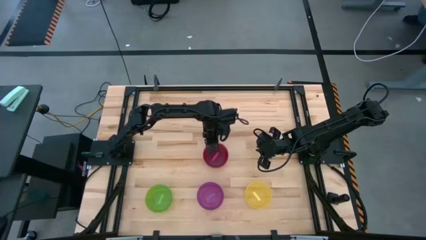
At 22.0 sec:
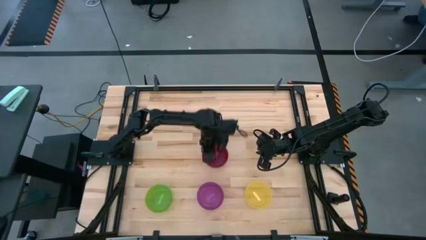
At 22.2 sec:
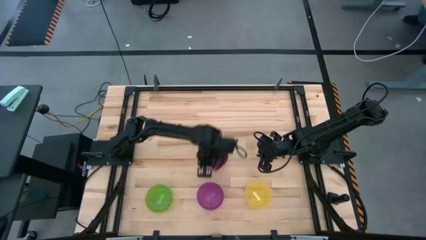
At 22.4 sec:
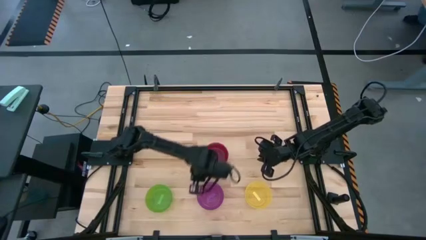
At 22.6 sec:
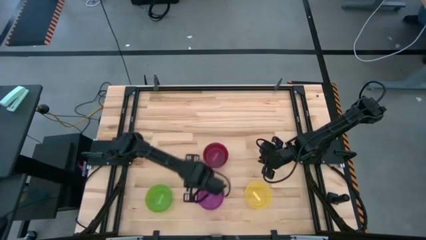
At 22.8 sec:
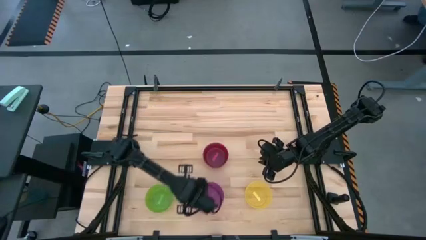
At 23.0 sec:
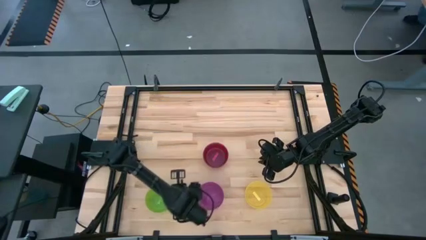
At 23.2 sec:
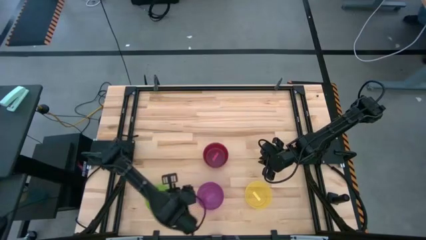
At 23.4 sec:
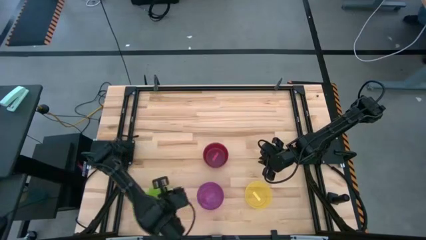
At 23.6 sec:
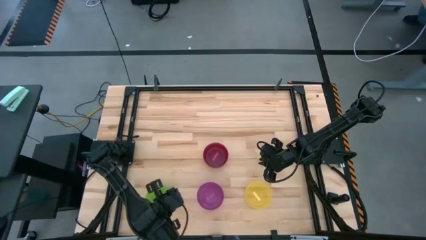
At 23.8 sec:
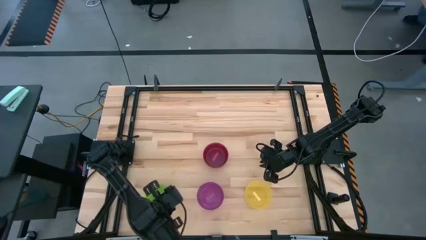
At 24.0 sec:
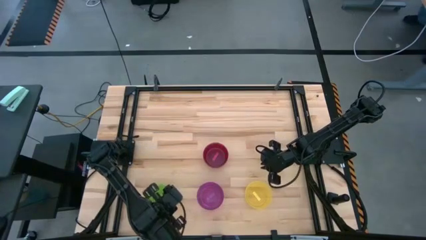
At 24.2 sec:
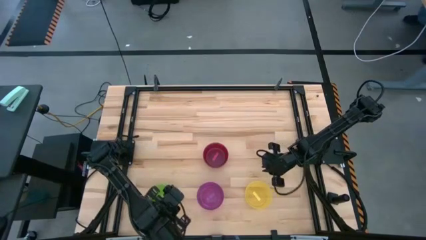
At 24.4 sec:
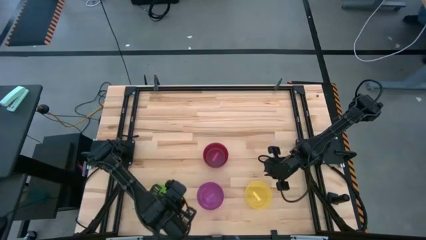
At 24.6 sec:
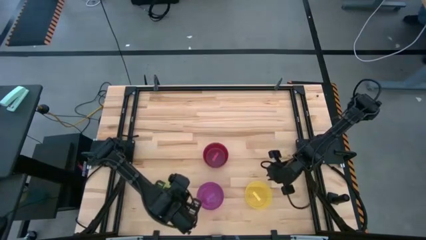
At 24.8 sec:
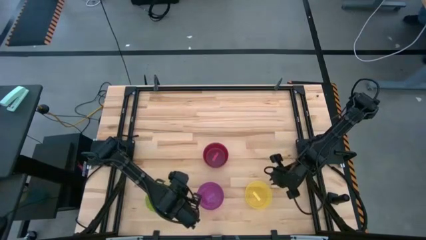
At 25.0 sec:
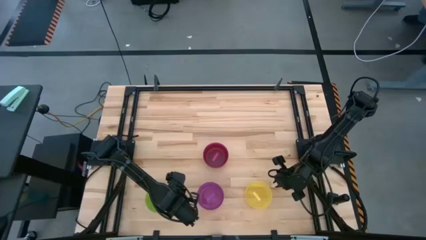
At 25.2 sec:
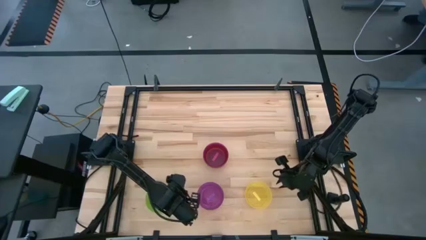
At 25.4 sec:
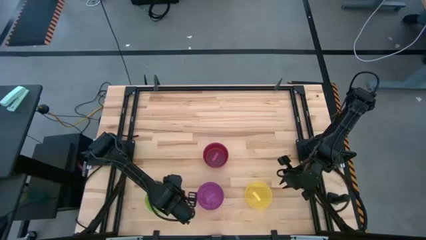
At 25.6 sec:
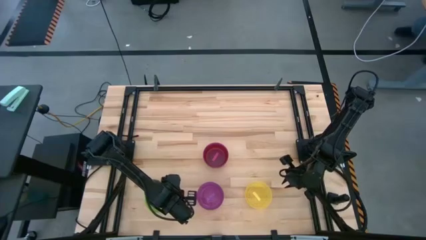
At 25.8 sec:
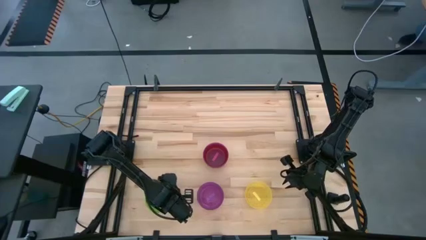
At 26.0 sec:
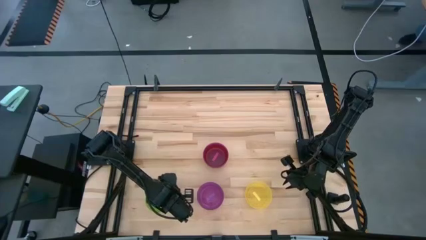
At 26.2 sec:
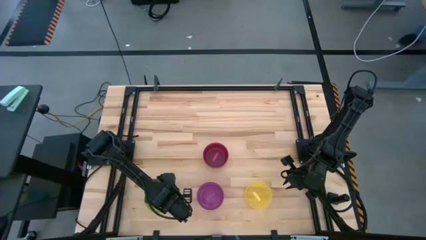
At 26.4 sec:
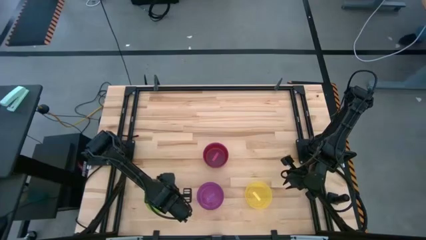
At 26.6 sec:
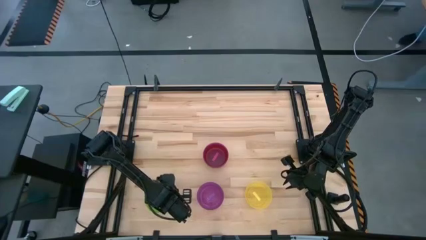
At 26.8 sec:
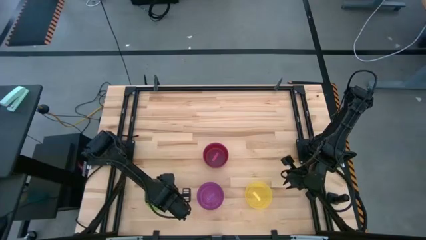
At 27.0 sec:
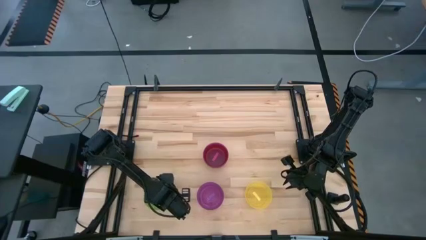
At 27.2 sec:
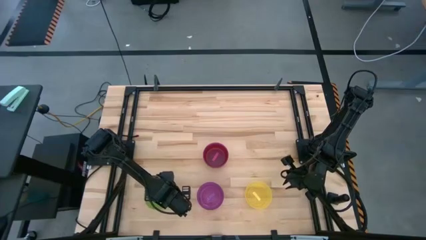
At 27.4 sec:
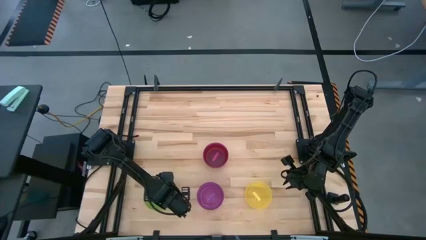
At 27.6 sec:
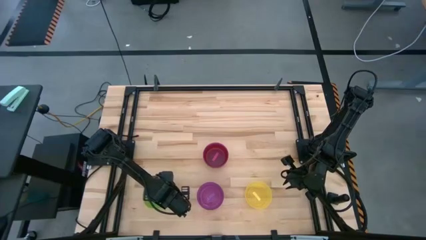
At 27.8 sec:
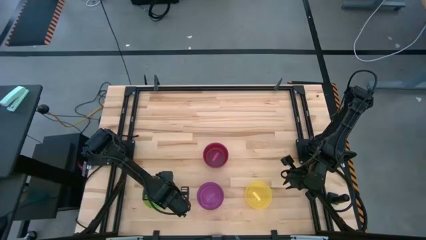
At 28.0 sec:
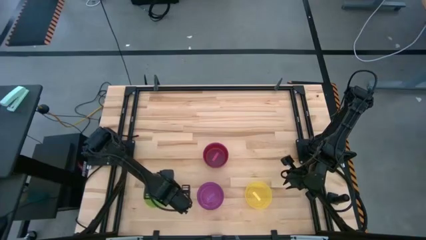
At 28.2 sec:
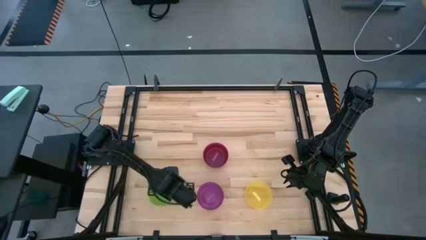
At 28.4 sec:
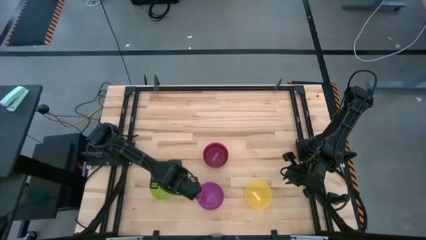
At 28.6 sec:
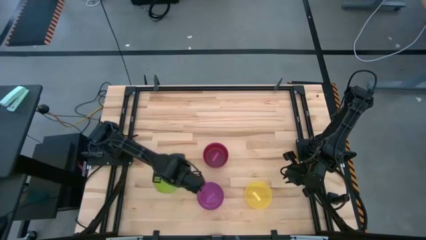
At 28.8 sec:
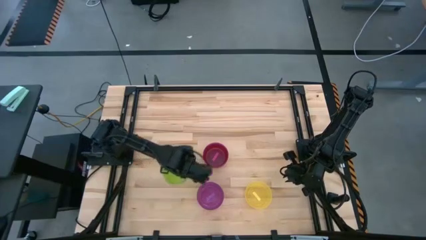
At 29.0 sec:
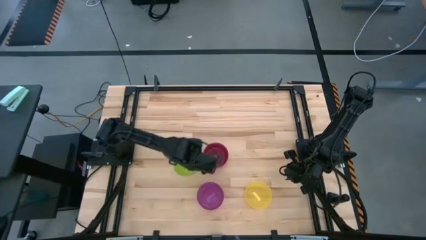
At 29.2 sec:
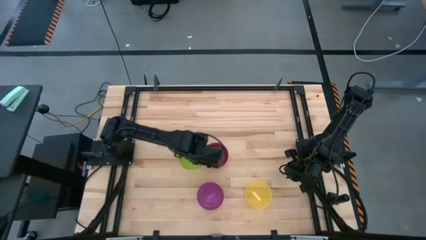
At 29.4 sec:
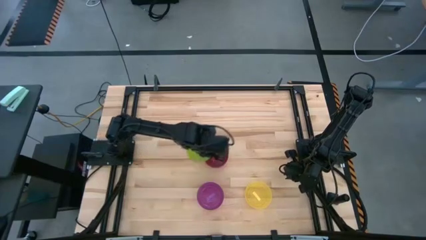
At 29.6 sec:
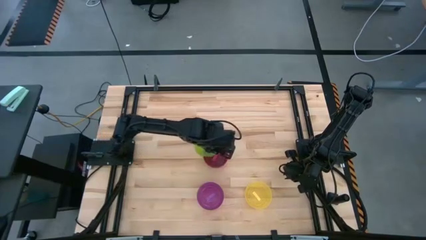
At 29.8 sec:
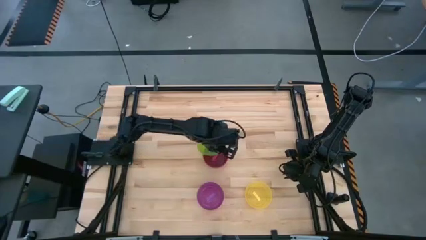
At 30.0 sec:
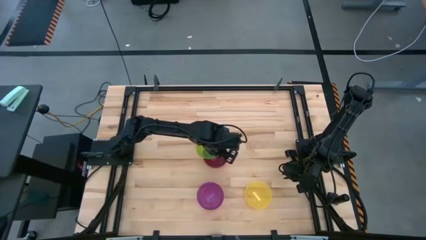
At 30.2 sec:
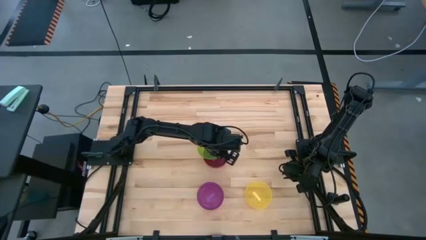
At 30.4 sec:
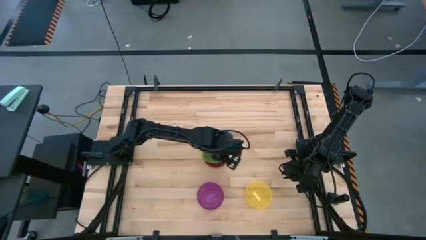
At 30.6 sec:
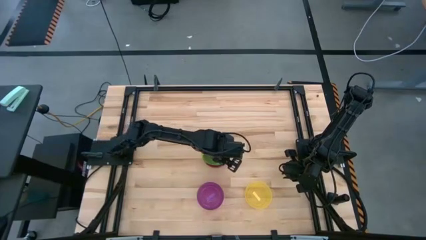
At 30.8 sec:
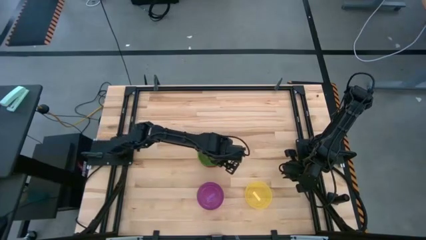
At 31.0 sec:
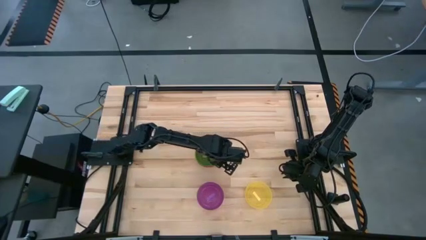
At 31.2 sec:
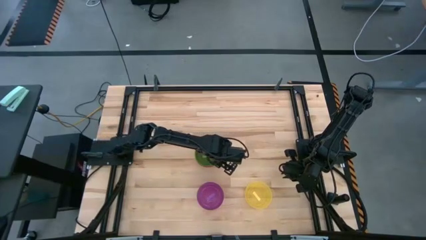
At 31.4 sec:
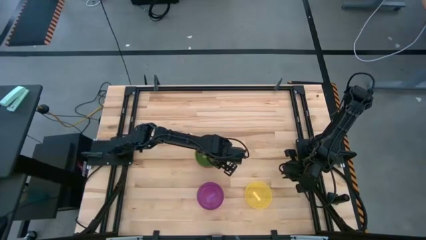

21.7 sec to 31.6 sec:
Task: Nest bowls inside each other
Stack the green bowl on top of the red bowl

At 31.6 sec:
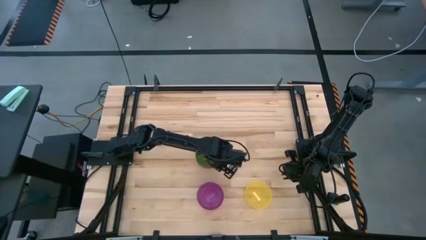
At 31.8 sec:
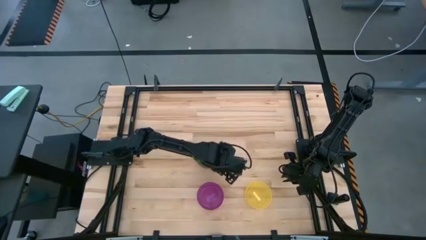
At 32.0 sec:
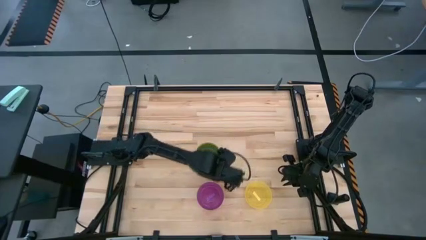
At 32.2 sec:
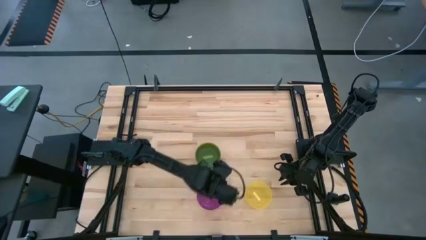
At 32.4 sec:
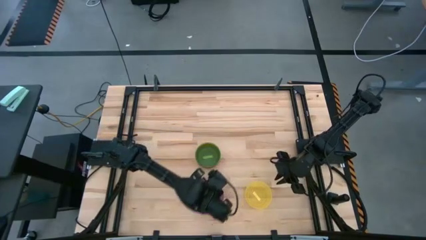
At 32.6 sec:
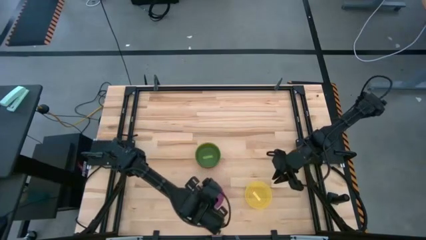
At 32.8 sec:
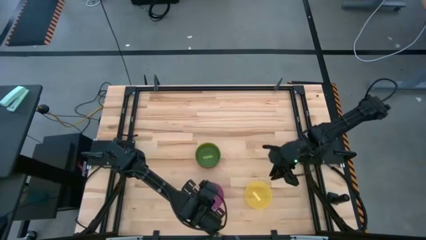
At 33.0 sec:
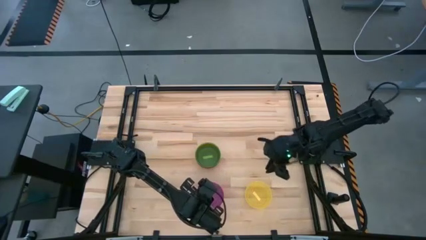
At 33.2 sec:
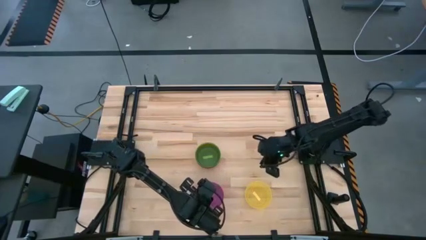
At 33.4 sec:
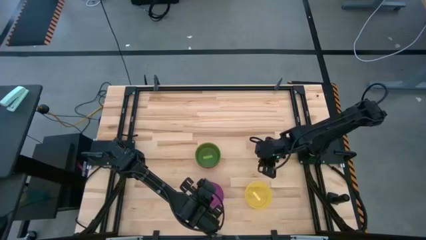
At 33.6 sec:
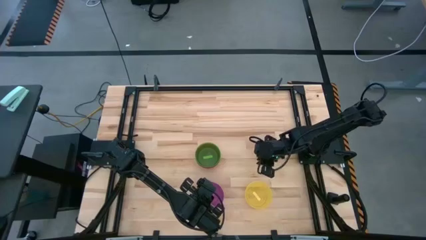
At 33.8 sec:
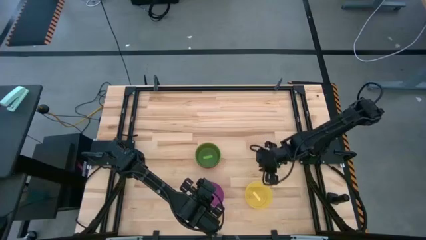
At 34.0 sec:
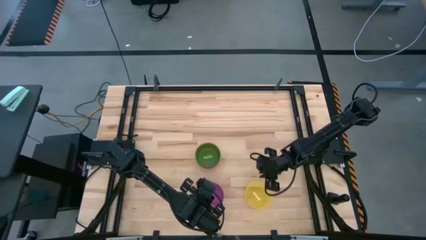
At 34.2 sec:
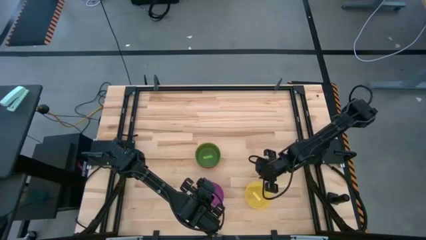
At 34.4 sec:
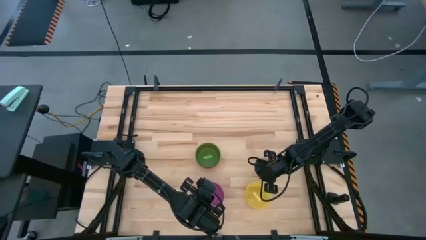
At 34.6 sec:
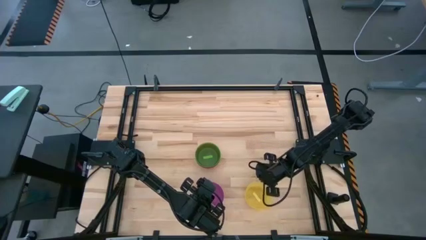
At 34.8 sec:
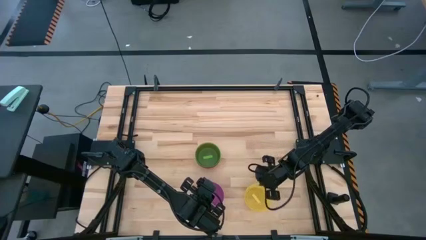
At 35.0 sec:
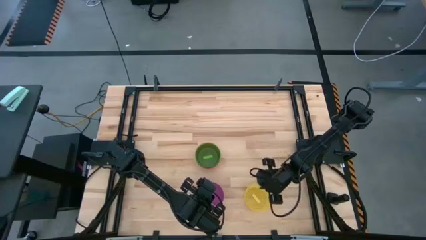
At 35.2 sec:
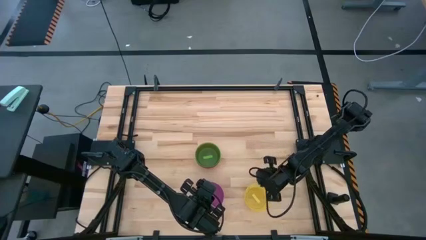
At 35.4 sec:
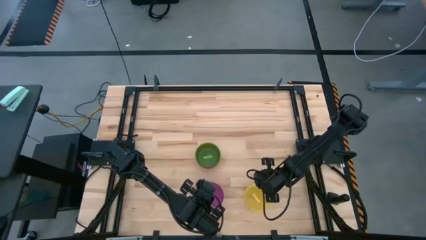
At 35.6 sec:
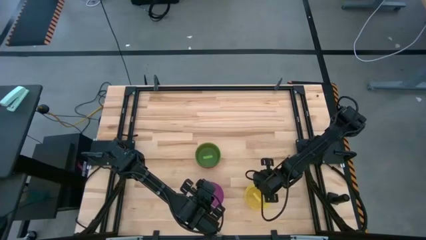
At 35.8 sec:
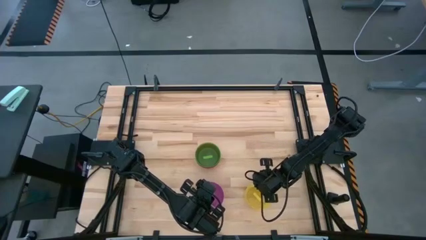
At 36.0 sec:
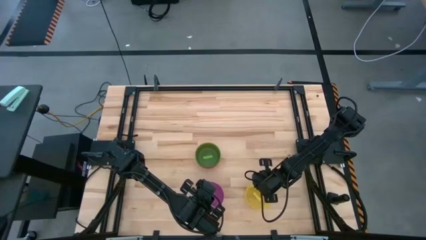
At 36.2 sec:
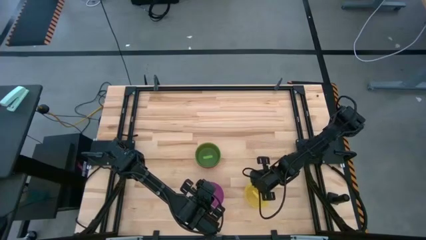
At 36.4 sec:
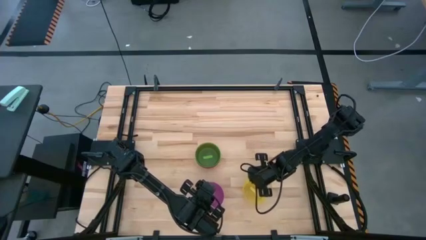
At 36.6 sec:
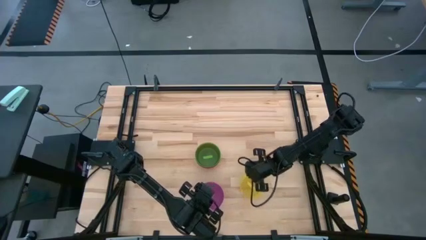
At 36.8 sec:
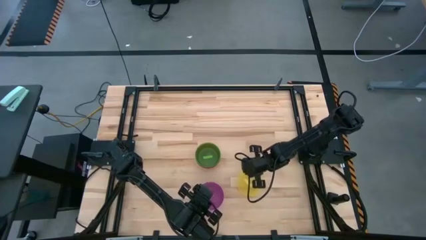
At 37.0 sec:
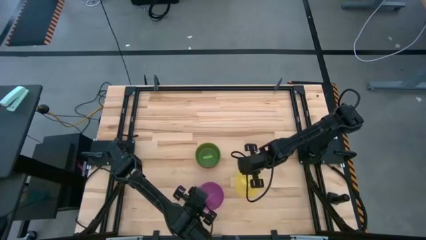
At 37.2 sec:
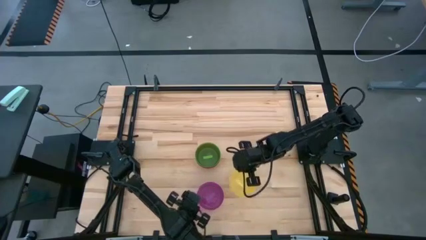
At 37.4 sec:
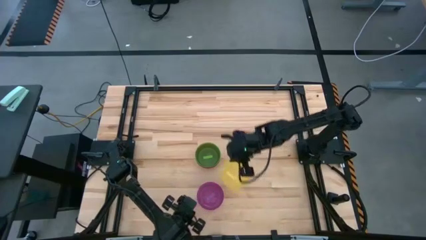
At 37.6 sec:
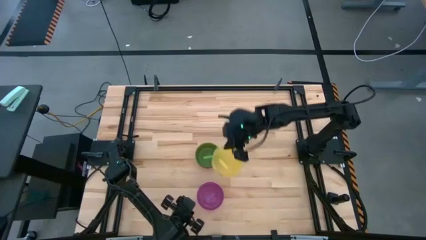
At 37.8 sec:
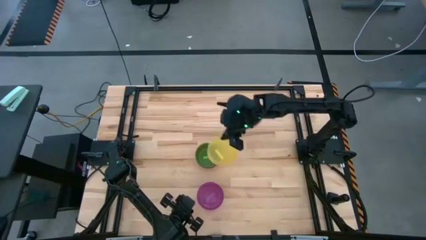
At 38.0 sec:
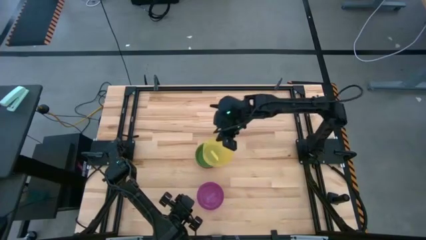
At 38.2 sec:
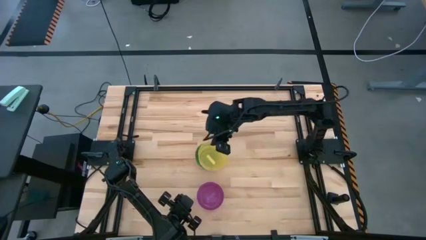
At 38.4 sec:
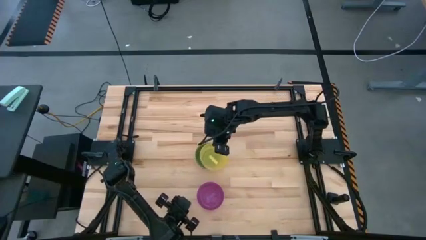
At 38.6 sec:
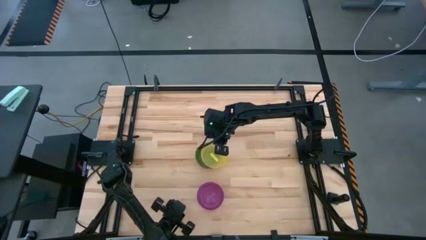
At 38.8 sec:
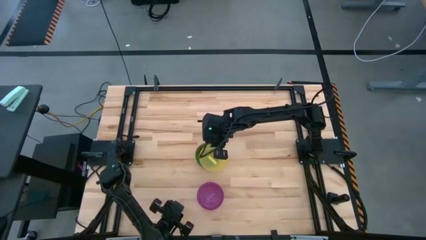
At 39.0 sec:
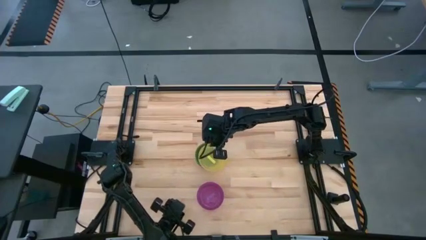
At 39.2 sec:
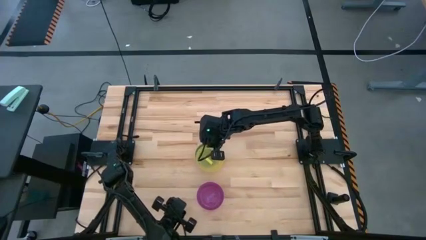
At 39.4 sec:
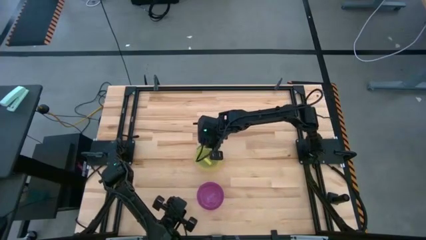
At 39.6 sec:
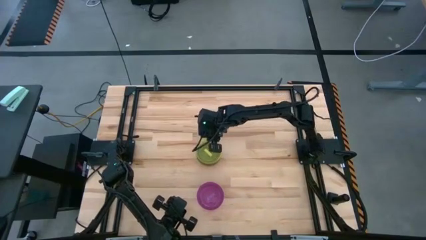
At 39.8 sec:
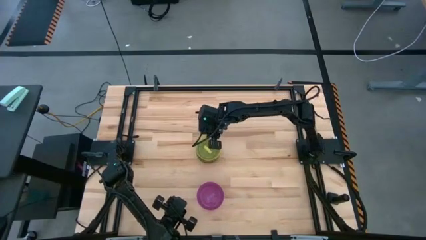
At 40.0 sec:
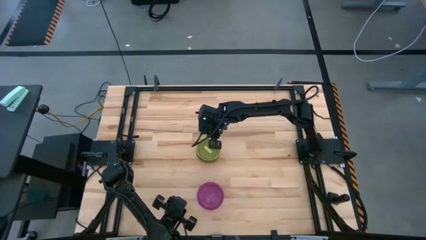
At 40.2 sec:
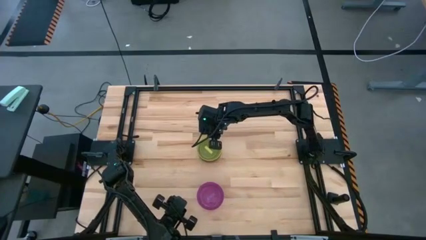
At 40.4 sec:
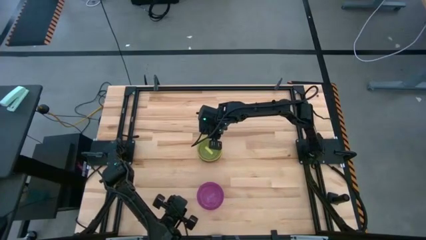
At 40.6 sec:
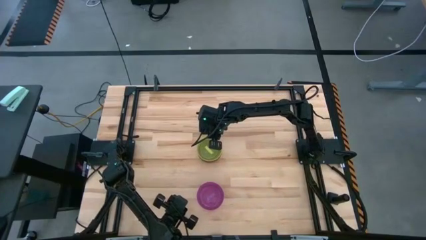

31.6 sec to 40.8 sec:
Stack the yellow bowl on top of the green bowl
